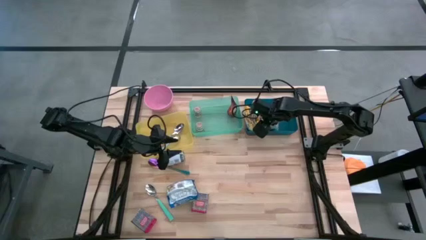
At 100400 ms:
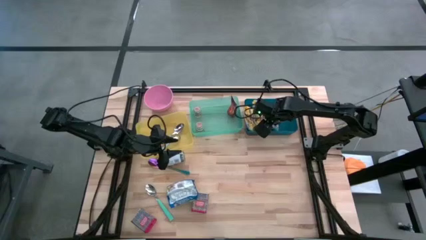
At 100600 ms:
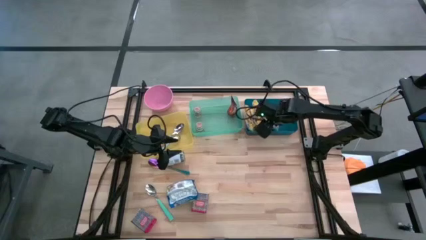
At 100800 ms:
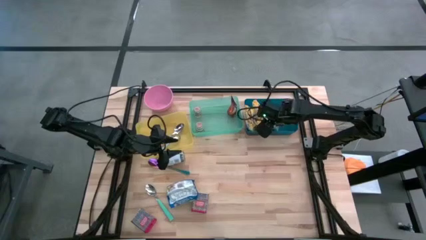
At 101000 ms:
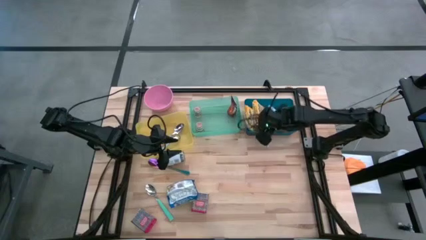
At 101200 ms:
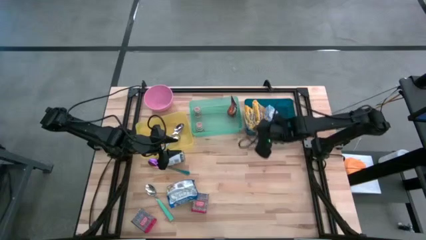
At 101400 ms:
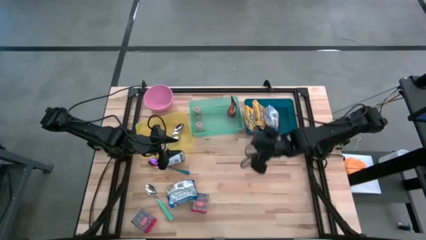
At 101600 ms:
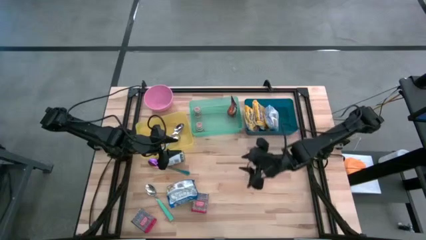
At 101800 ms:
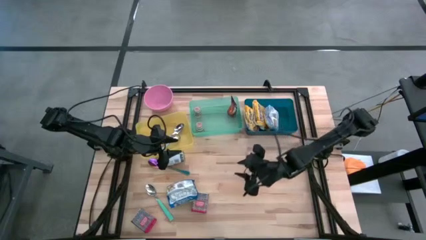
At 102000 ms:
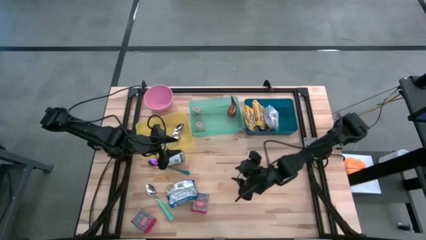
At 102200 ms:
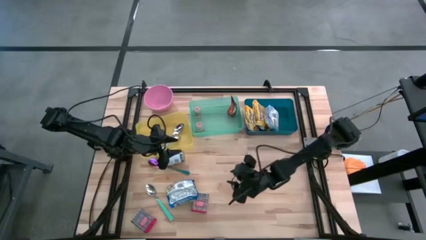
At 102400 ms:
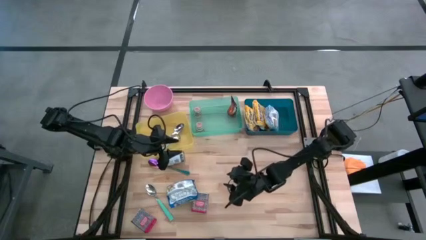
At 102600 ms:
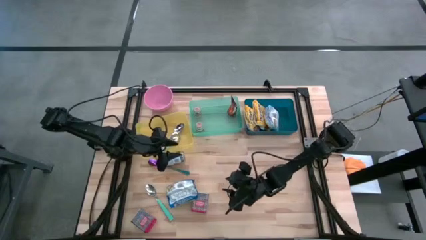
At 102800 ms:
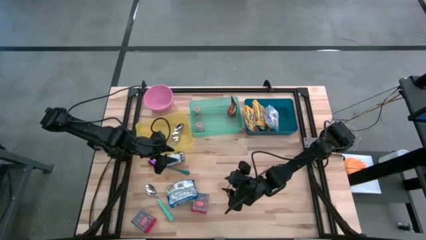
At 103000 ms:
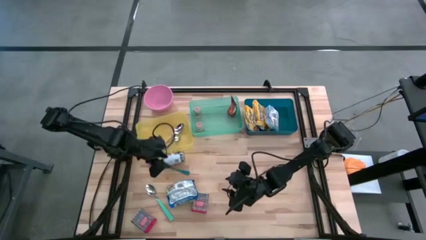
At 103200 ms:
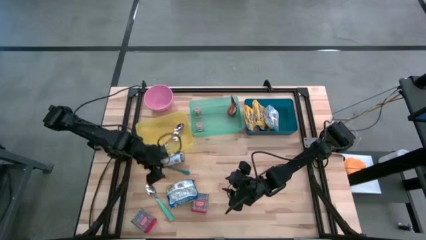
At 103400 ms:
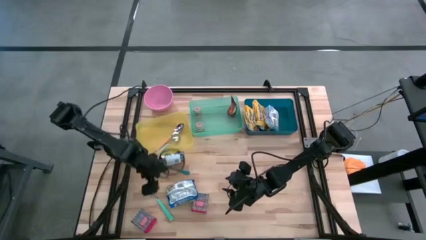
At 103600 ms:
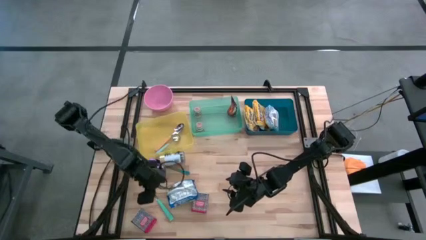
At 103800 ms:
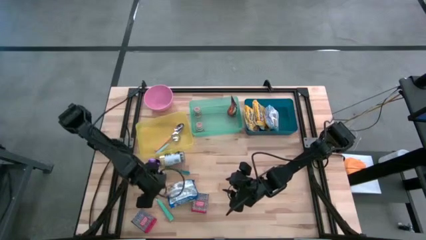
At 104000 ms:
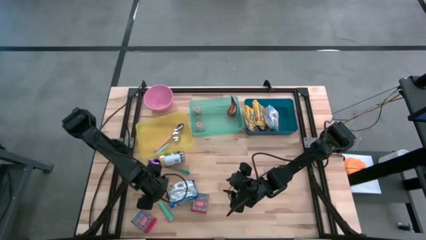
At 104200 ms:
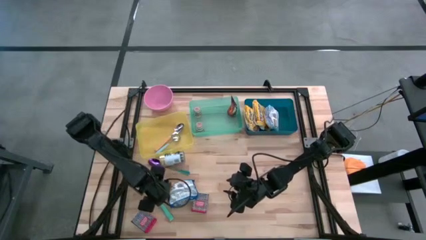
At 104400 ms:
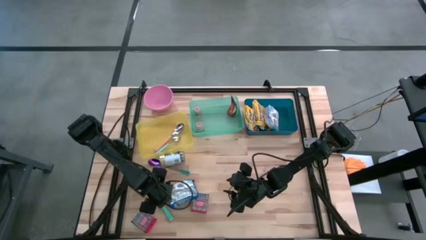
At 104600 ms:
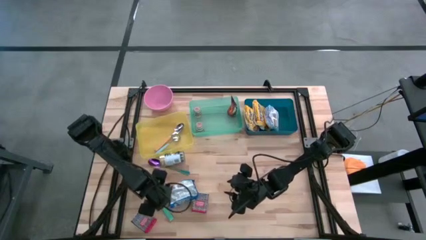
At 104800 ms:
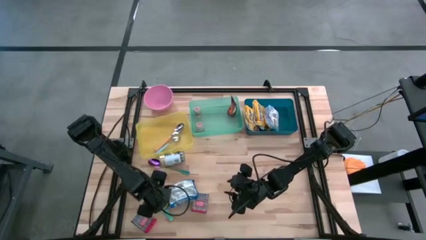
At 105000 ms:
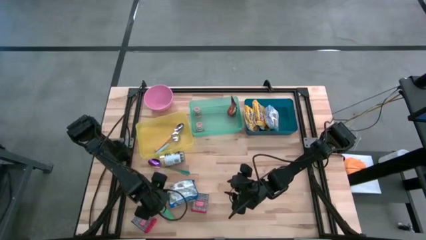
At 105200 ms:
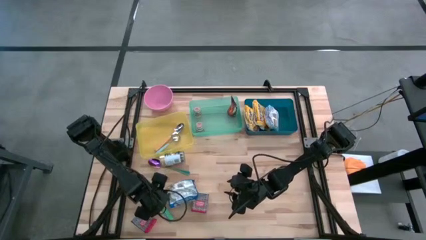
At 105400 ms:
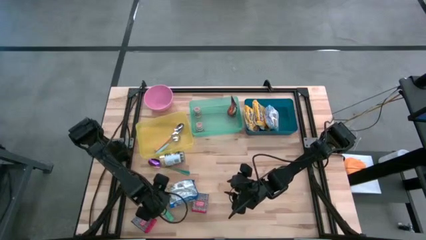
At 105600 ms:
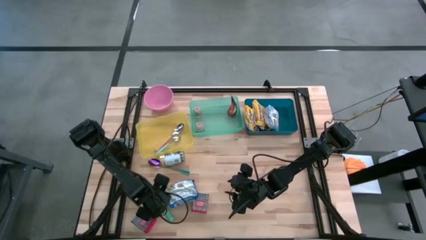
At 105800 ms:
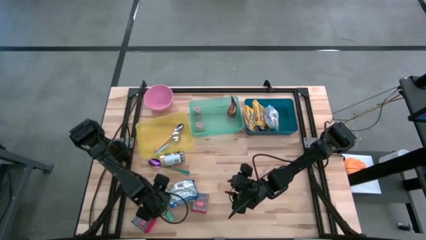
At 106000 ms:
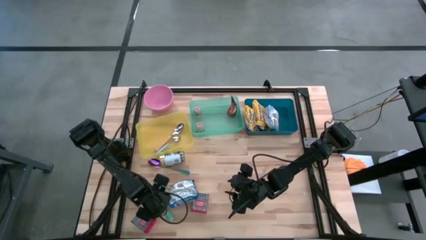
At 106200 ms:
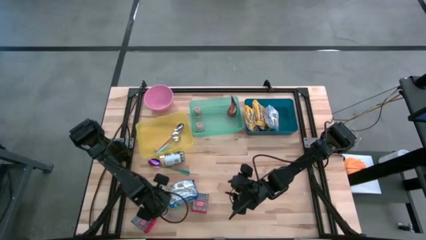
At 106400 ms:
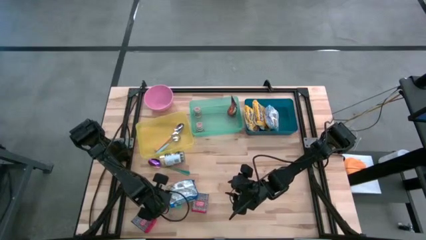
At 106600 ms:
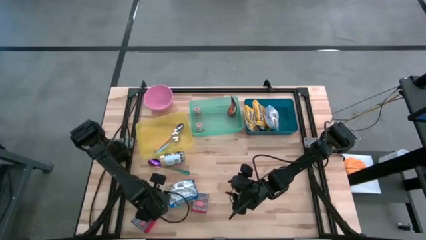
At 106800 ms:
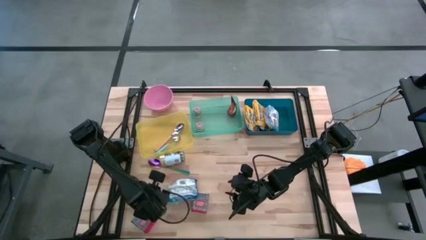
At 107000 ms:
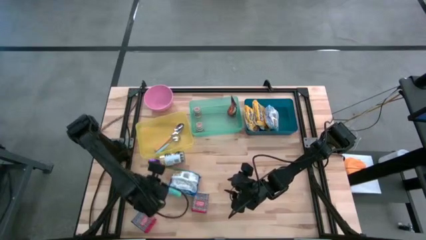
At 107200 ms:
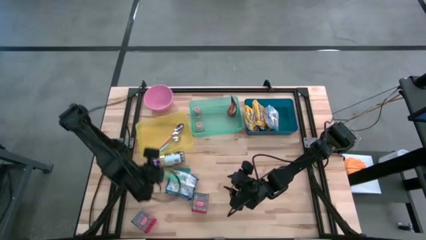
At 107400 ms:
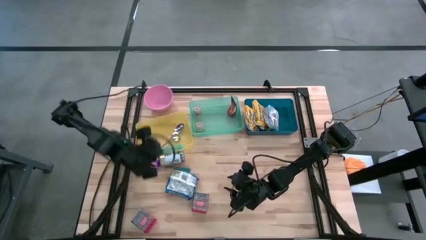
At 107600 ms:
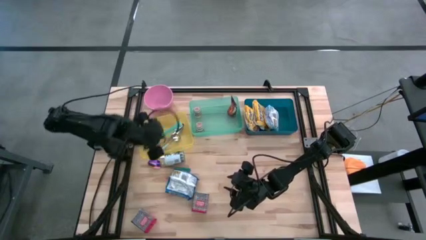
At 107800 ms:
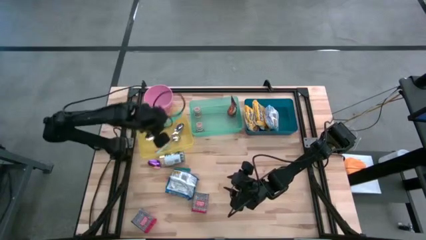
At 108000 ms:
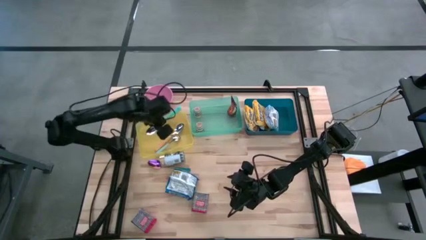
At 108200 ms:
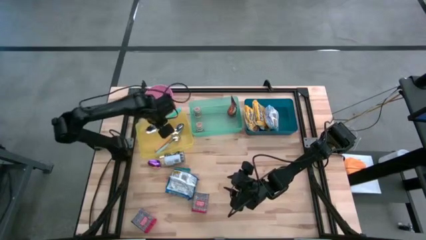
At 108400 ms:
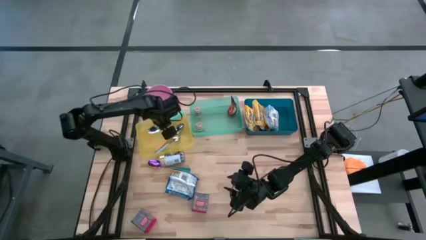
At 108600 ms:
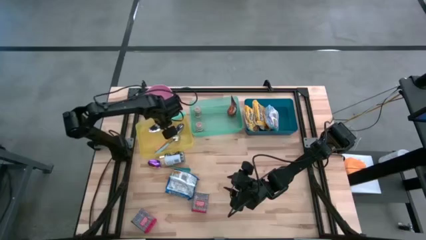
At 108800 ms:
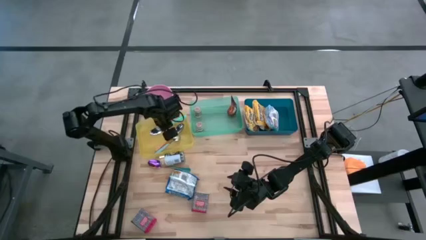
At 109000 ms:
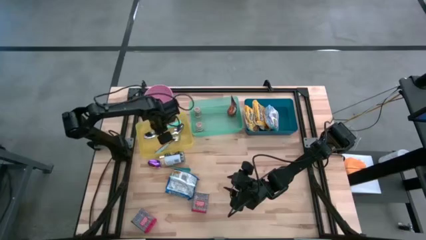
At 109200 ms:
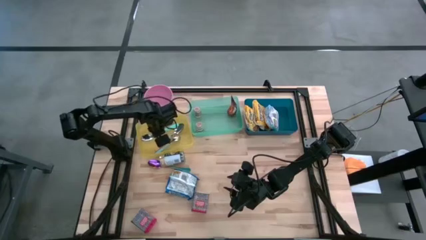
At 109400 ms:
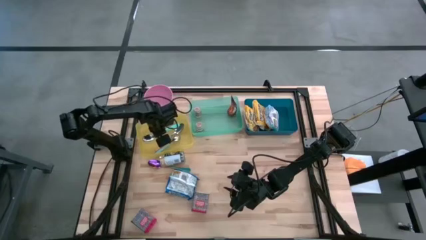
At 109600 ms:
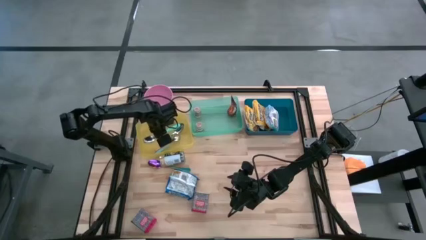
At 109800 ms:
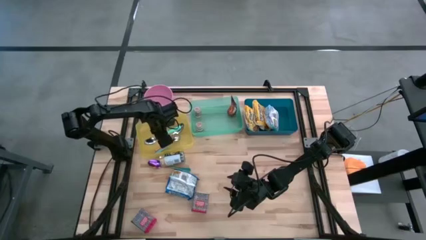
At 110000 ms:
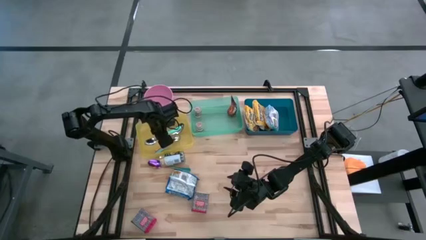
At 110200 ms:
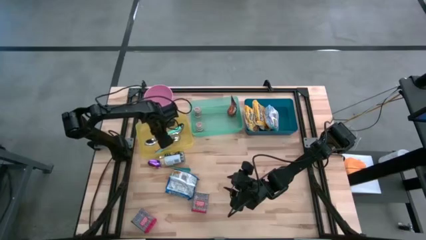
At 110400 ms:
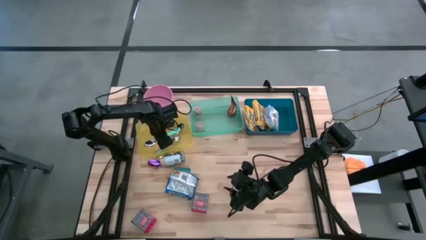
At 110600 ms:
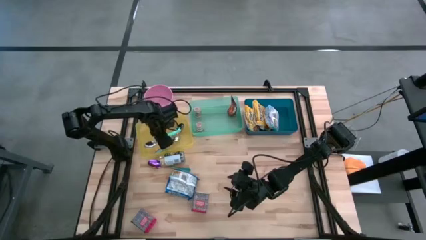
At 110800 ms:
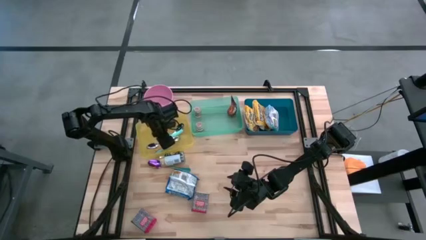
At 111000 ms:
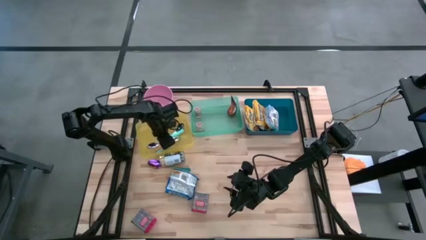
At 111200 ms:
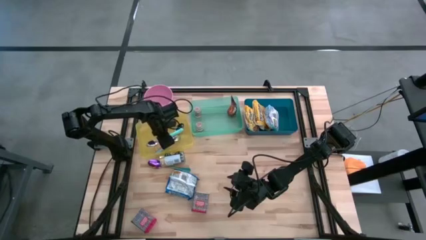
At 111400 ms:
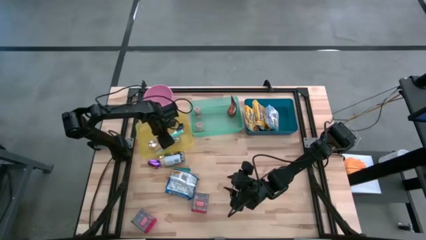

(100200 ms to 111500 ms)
Put the blue spoon into the yellow bin
